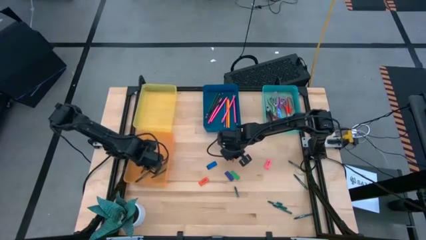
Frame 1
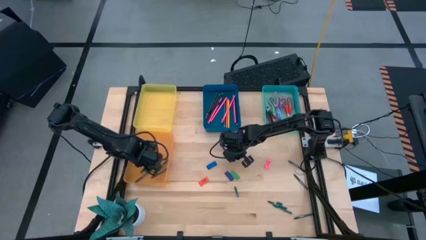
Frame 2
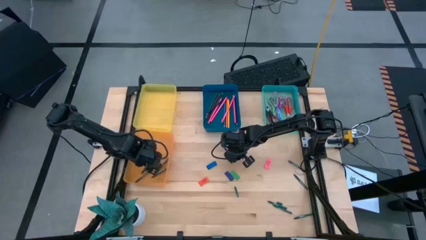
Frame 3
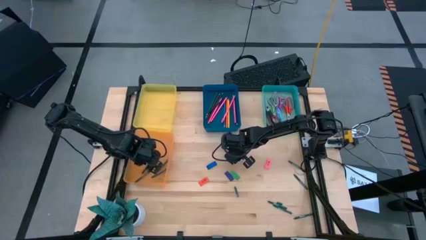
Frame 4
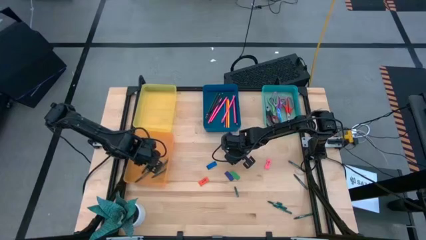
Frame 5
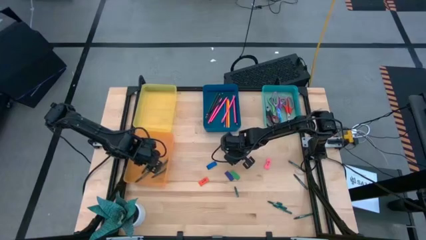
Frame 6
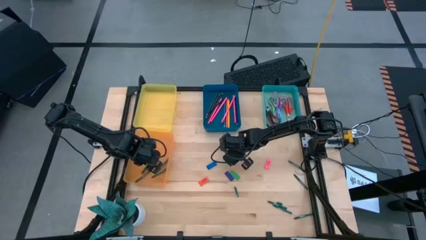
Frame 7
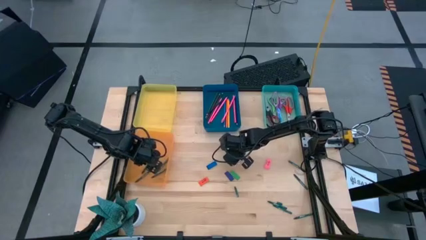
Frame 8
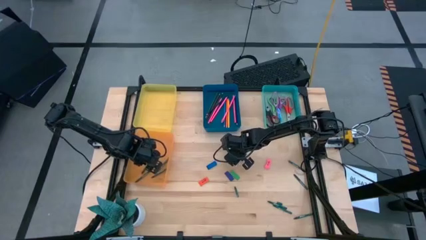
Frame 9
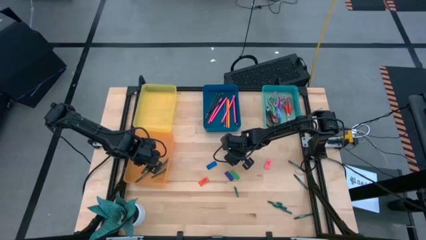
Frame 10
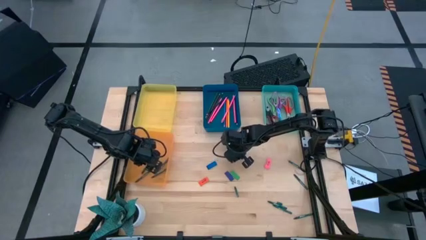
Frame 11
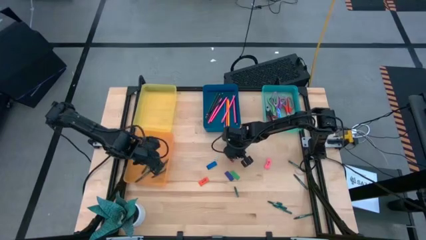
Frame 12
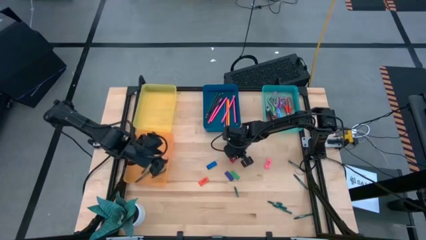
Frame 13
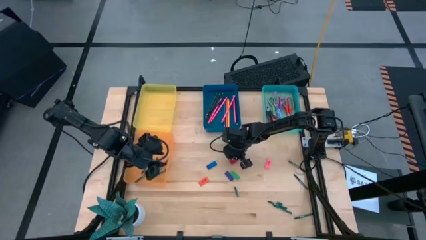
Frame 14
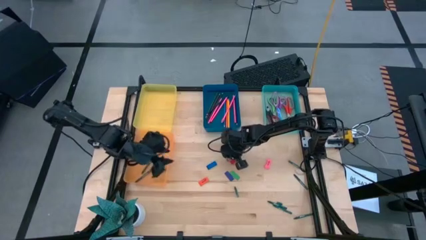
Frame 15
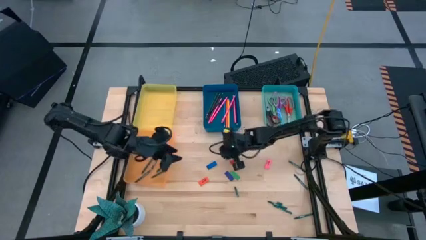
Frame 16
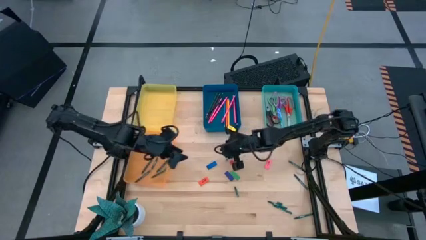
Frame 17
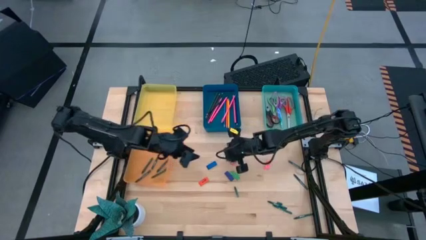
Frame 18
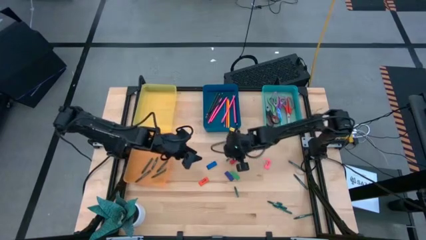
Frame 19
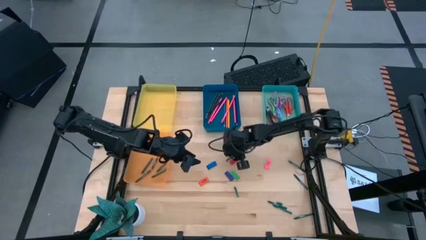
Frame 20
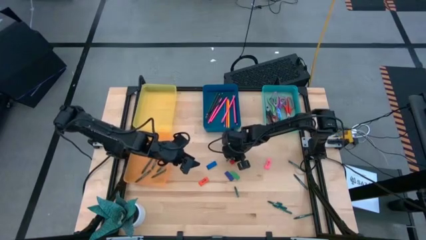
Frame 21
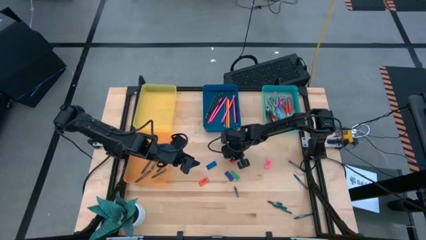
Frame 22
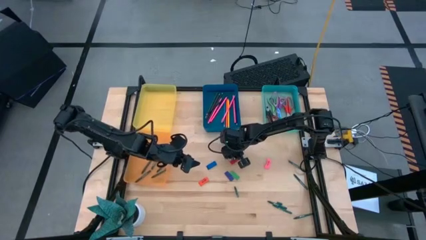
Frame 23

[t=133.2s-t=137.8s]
Task: Sort crayons/erasers/pens/pencils in bins
Put the green crayon into the orange bin

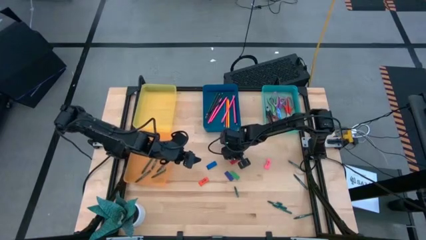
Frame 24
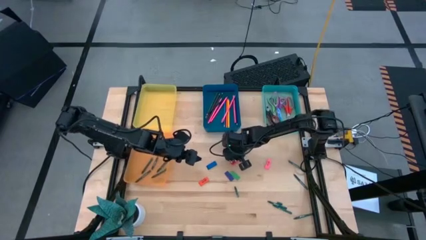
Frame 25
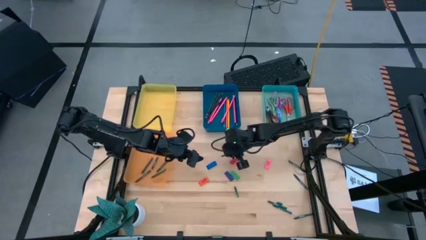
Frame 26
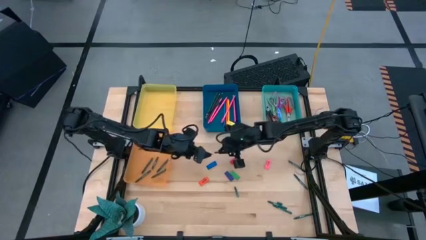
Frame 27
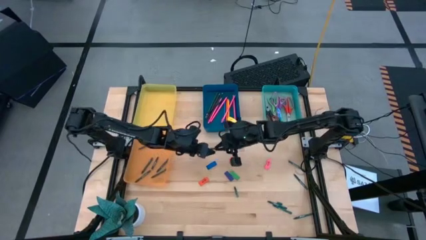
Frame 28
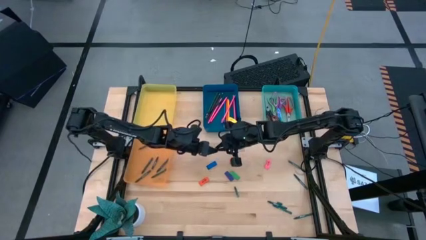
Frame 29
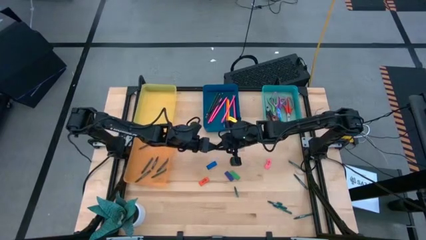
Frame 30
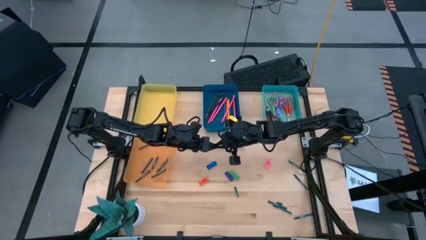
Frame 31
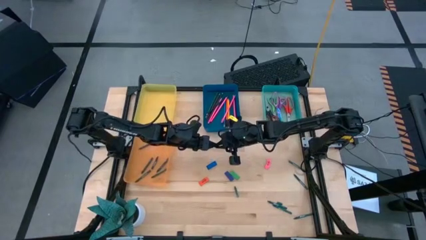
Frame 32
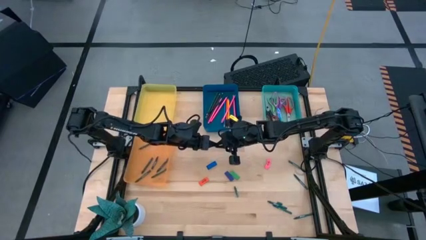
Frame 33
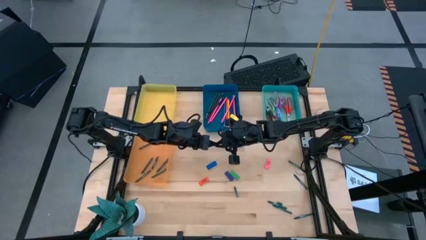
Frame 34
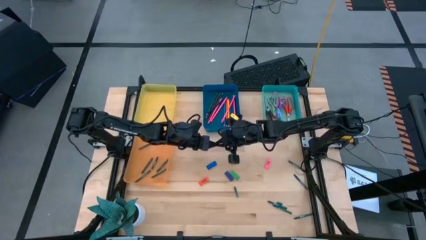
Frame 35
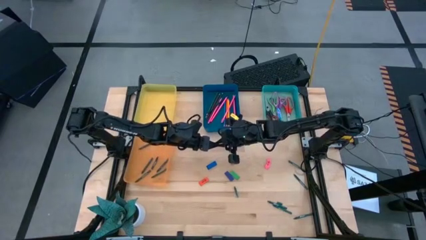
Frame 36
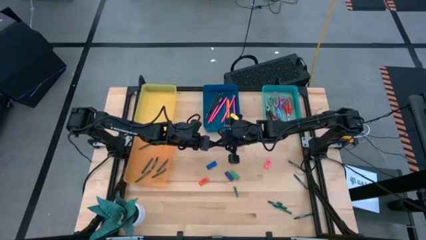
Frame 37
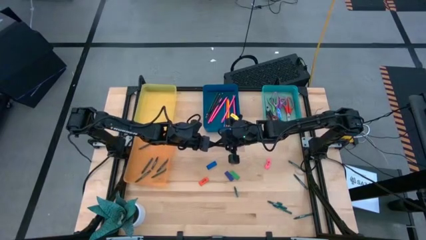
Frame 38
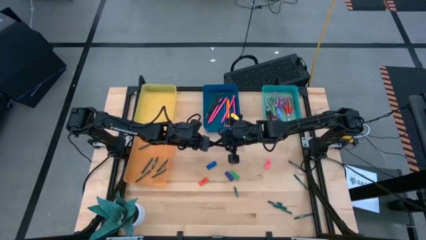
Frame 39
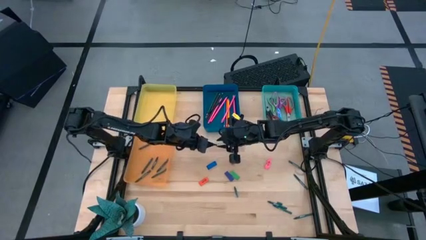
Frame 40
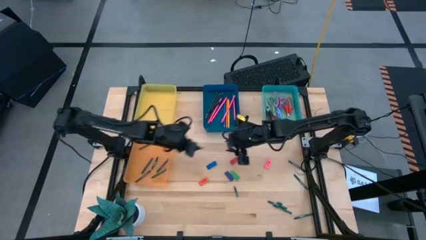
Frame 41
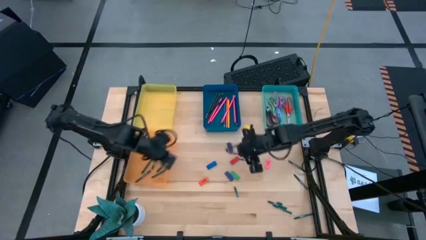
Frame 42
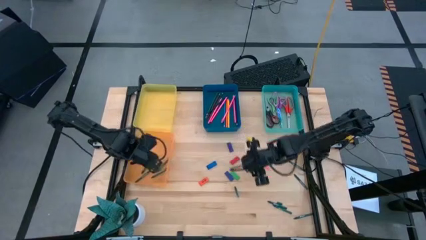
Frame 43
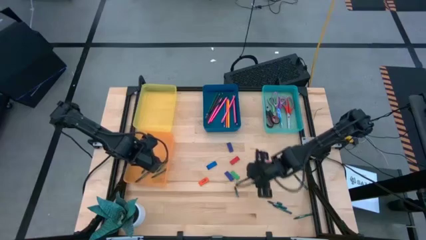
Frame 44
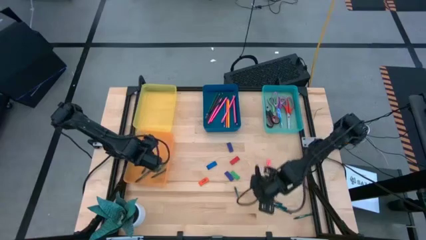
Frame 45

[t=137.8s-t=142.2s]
Put the green crayon into the orange bin

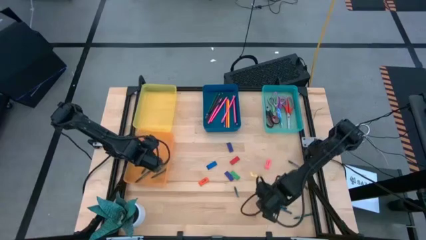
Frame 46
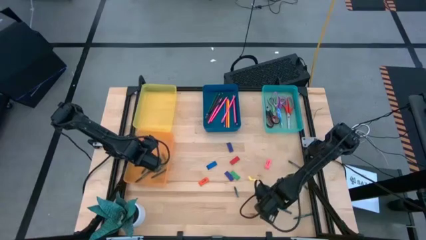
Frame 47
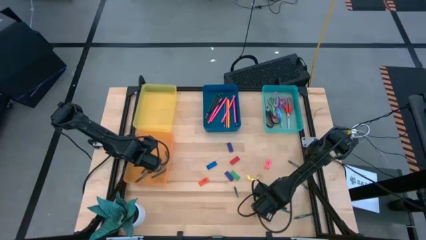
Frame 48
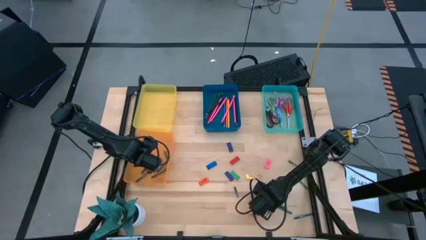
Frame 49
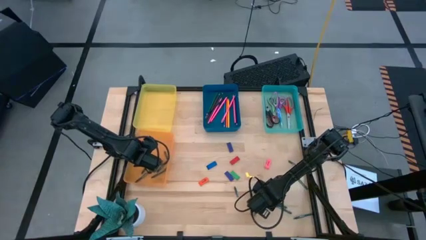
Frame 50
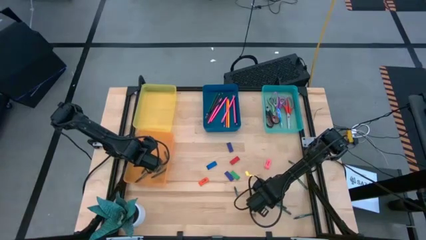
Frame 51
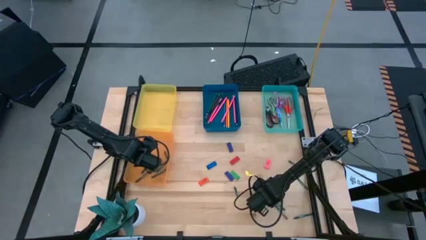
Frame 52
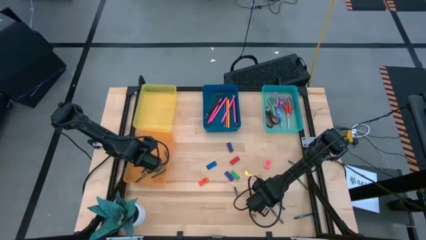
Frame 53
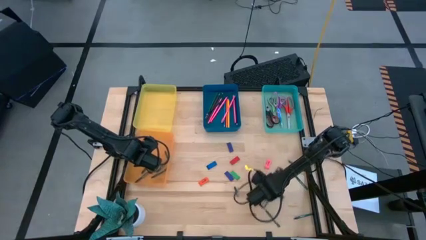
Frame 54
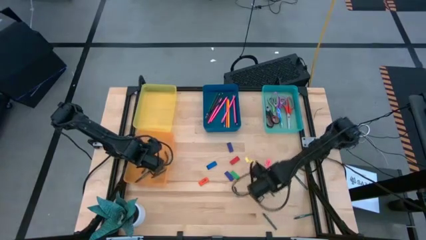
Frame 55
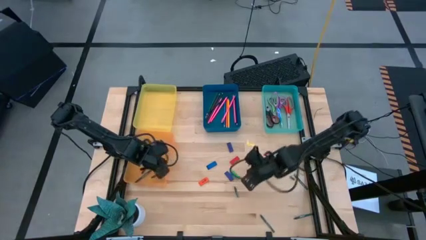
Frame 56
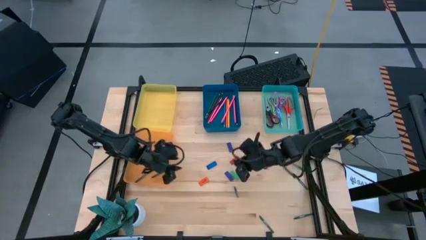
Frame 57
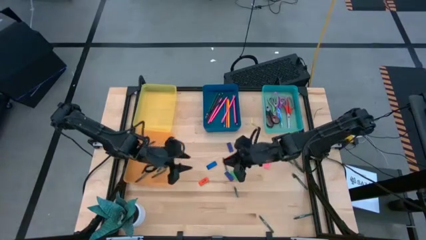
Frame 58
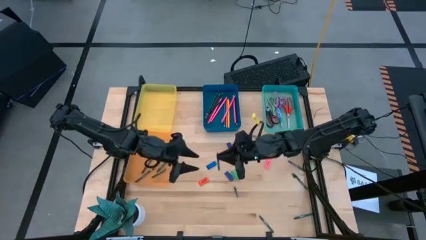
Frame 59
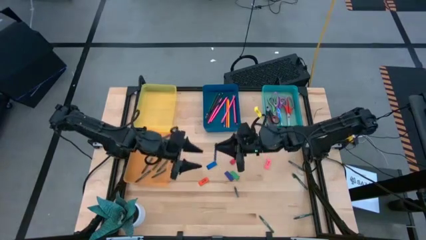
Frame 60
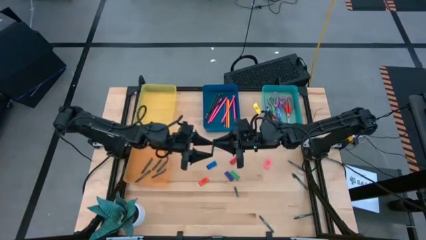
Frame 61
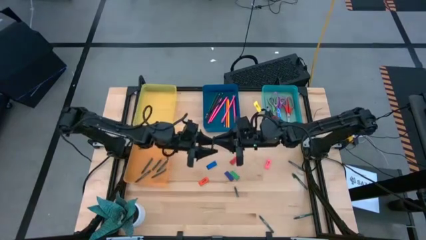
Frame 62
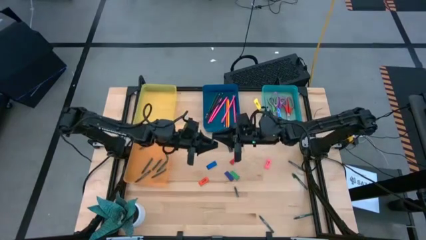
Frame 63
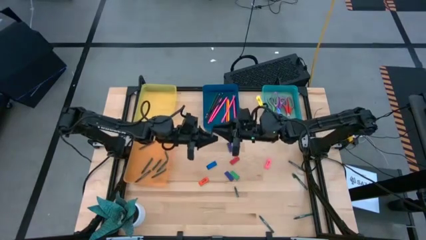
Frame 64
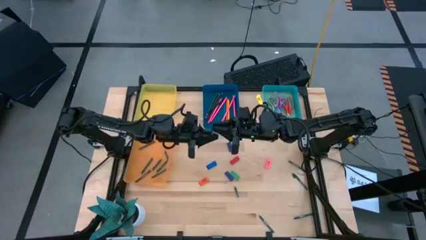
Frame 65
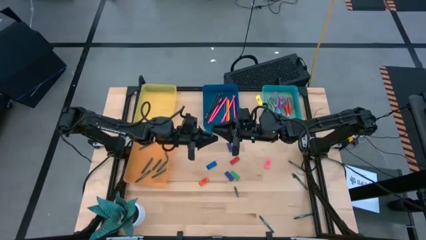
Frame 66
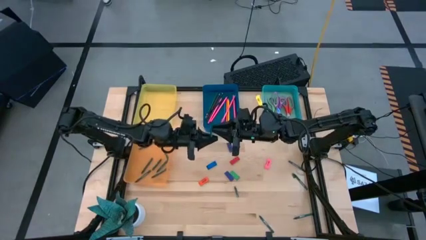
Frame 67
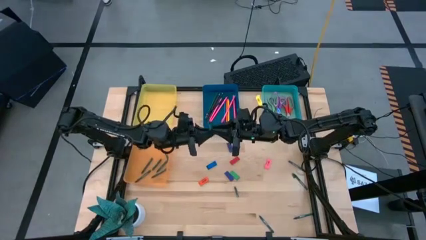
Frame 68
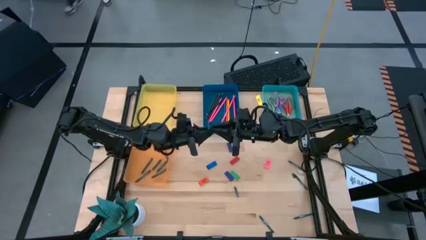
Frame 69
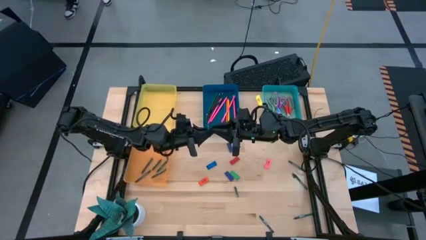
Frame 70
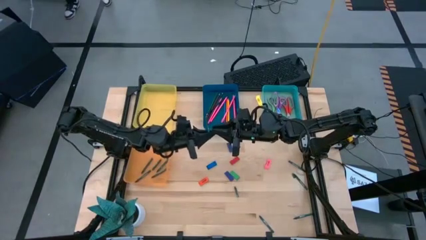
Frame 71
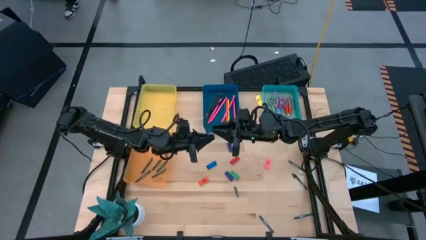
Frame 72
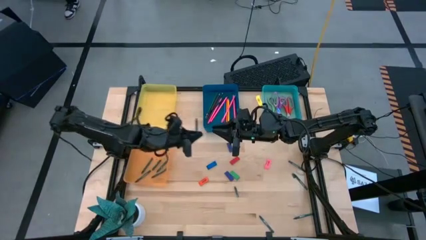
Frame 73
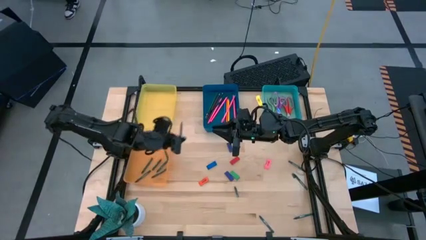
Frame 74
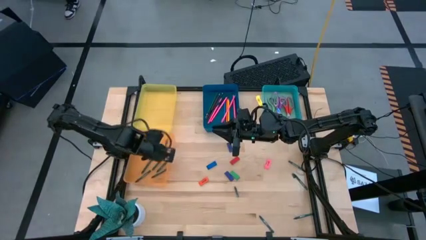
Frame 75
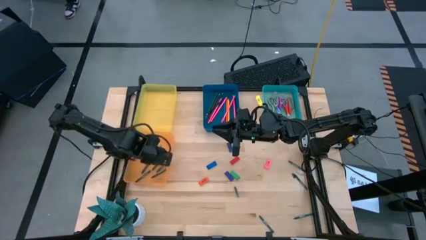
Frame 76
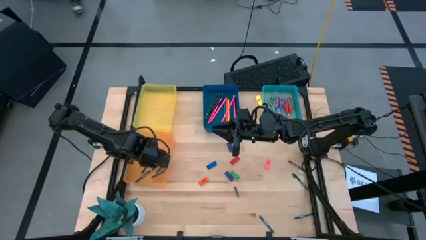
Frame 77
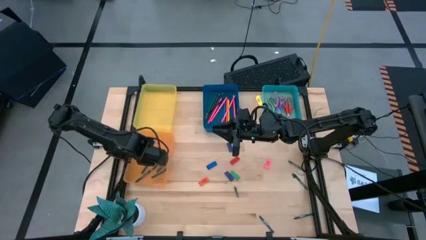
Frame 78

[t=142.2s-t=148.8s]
Put the green crayon into the orange bin

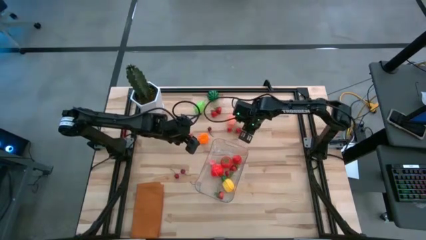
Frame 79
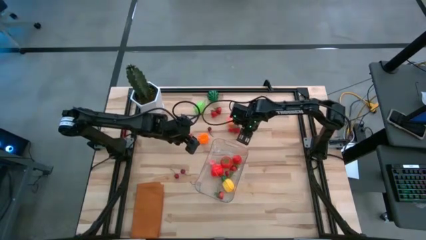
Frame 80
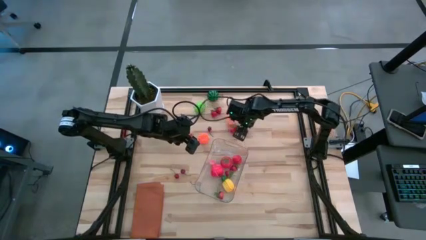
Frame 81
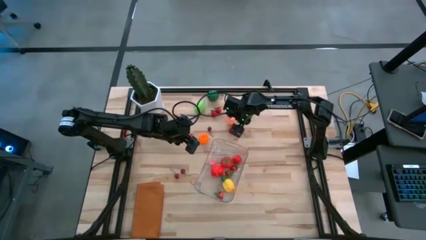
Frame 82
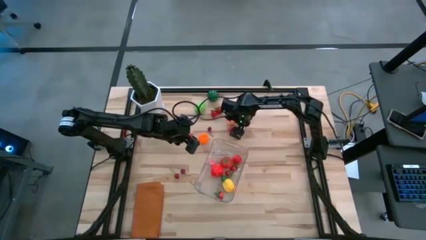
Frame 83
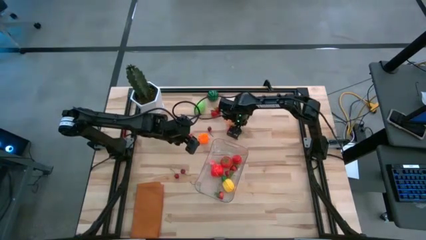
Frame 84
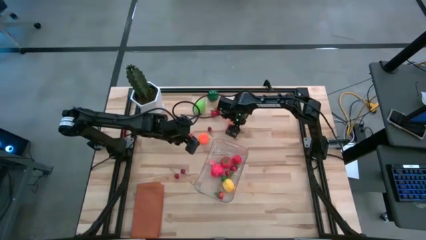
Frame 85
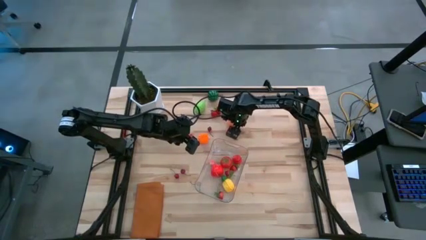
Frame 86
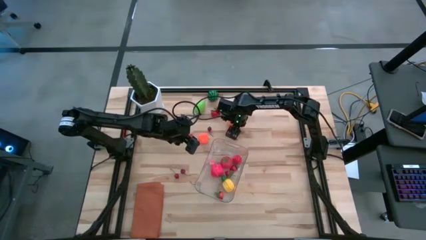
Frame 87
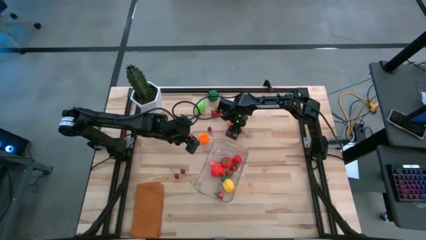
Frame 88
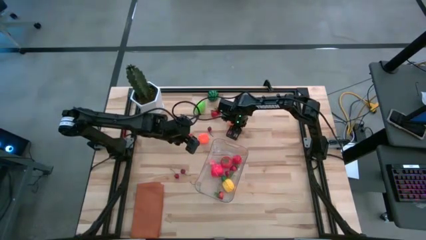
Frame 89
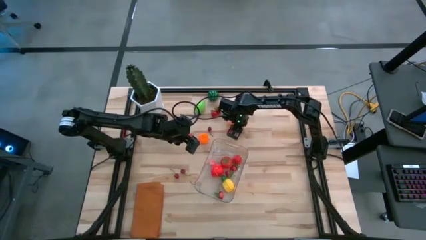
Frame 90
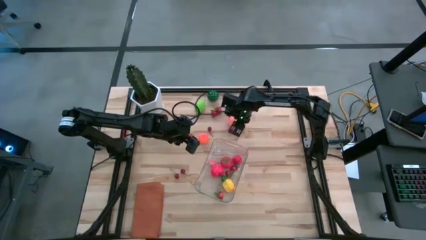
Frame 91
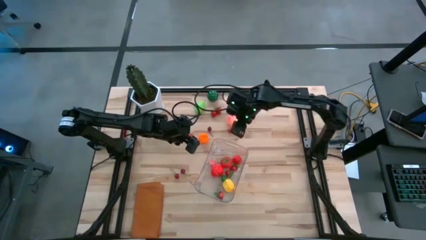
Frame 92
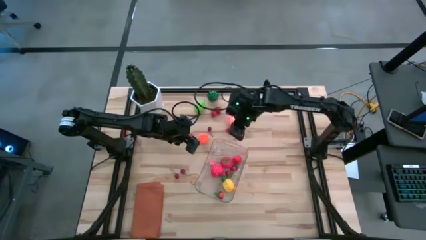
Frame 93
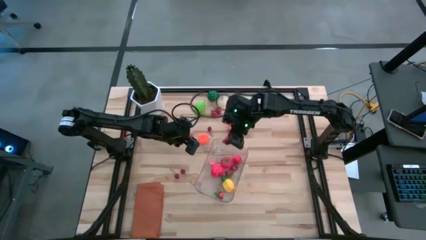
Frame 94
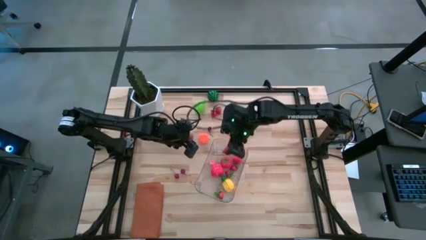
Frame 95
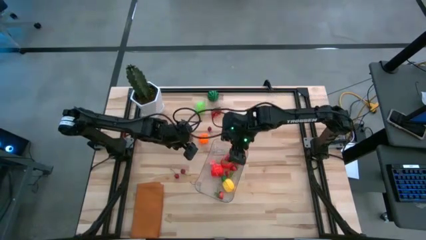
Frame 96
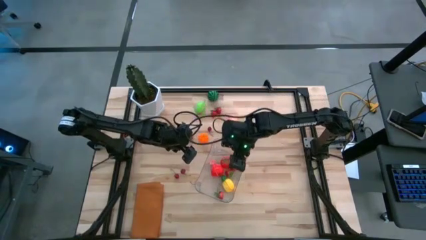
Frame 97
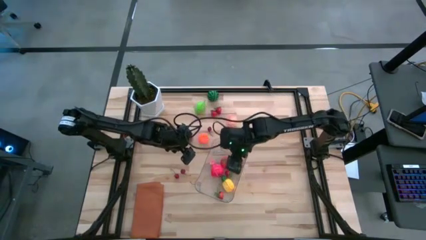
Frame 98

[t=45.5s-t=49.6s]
Task: Pick and placing Produce into tupperware
Put the red strawberry into the transparent bin
